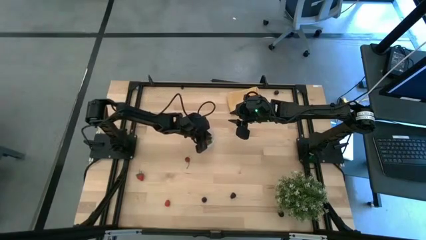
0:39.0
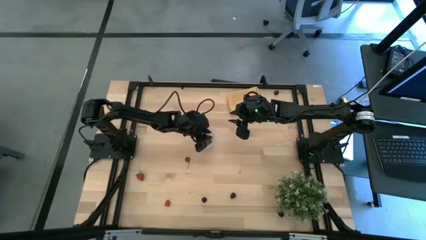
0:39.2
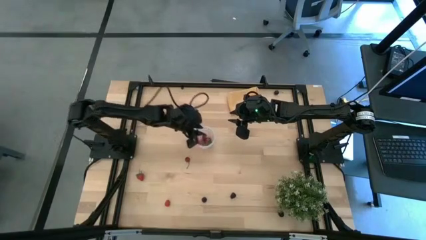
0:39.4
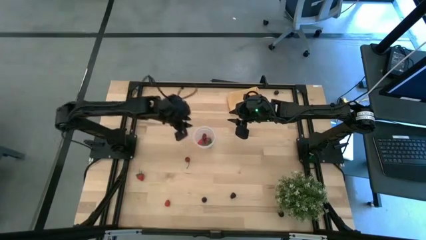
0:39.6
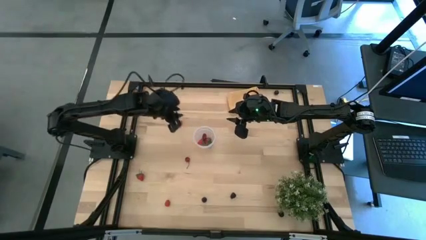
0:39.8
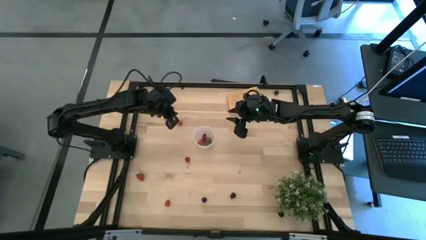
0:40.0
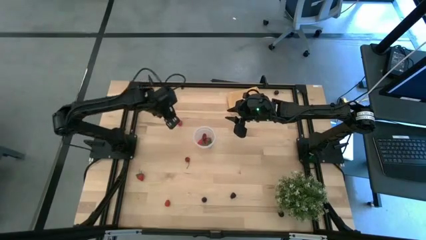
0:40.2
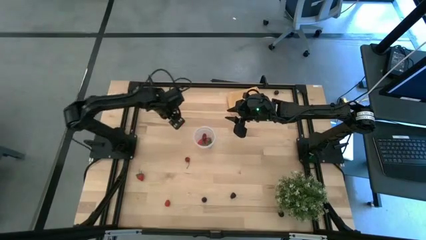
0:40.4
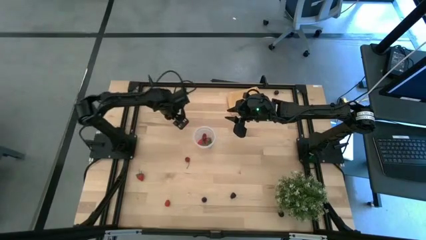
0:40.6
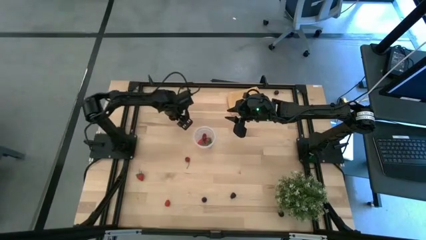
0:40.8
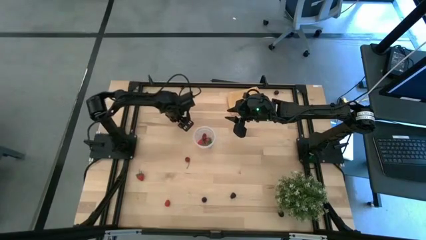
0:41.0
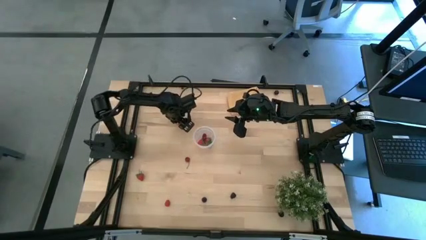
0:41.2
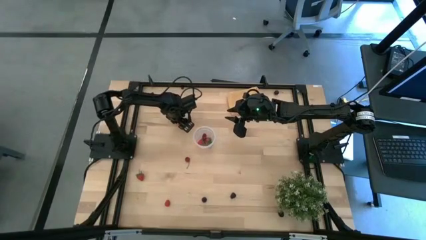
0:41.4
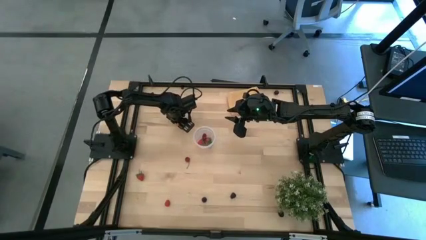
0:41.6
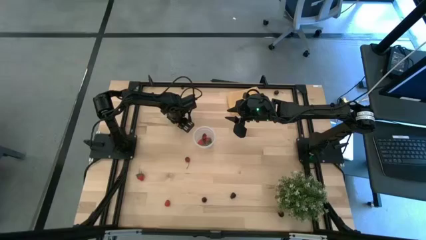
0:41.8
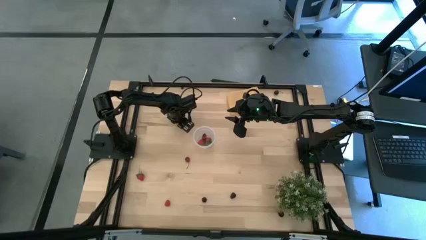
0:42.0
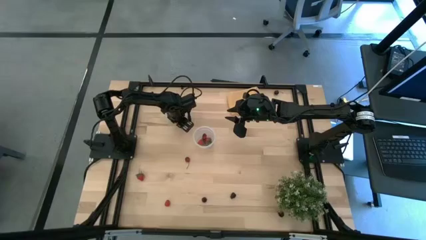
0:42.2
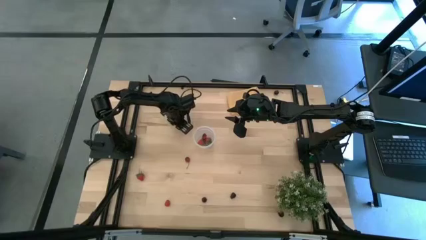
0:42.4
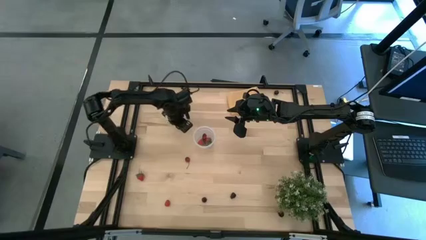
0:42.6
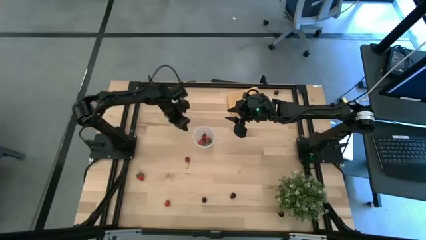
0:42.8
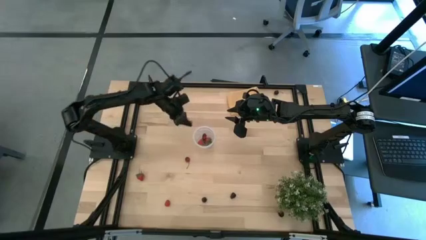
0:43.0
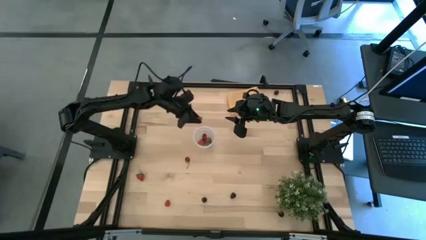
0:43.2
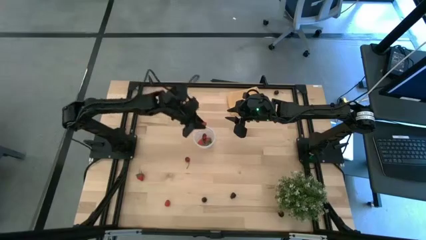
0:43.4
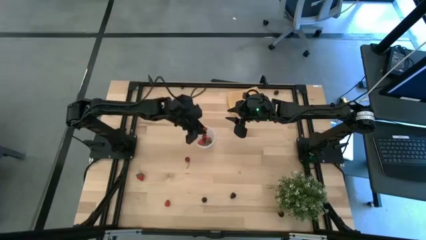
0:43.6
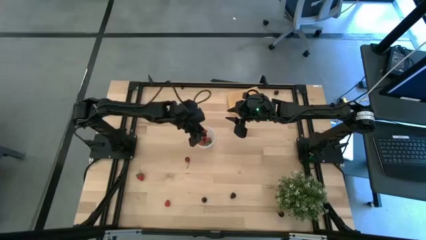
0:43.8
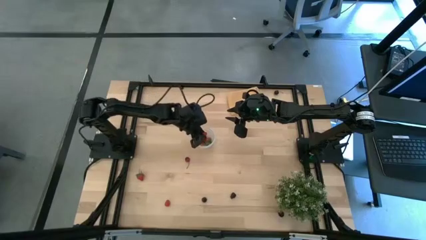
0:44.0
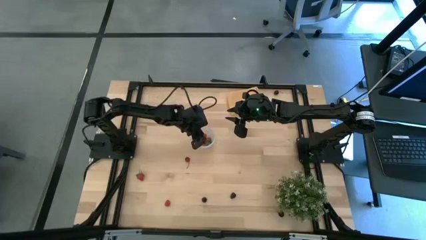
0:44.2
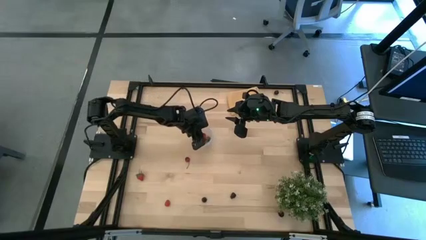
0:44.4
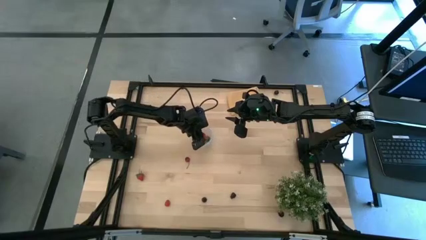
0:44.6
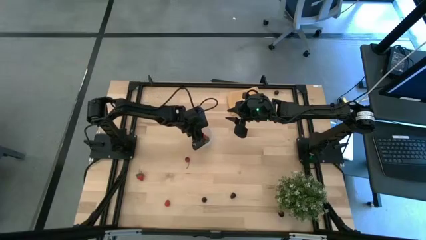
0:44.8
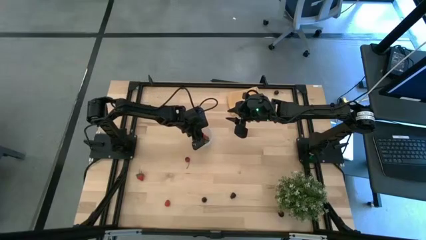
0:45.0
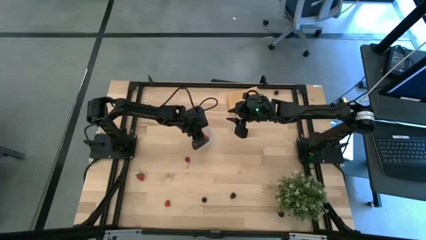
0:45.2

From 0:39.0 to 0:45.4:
Task: Pick and placing Produce into tupperware
Put the top red raspberry into the transparent container

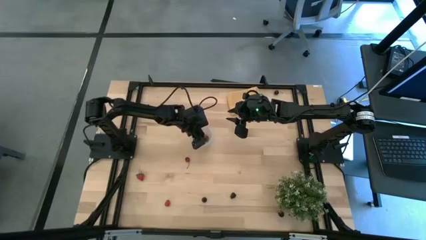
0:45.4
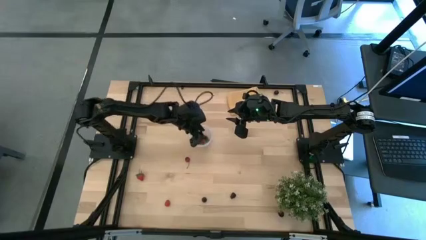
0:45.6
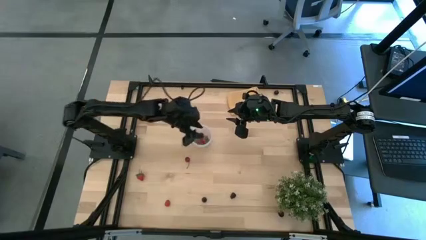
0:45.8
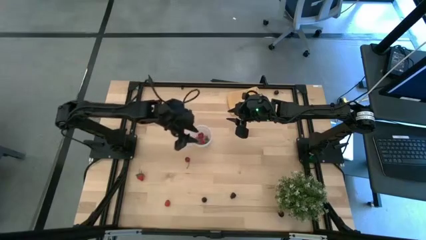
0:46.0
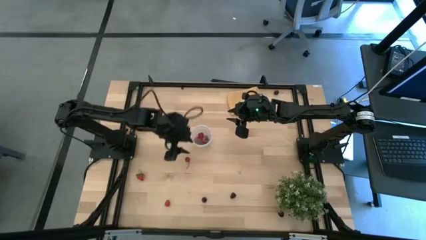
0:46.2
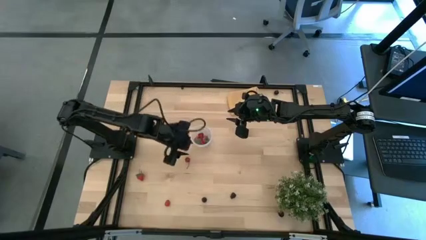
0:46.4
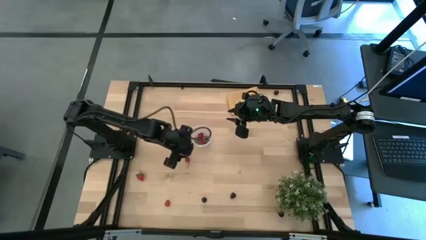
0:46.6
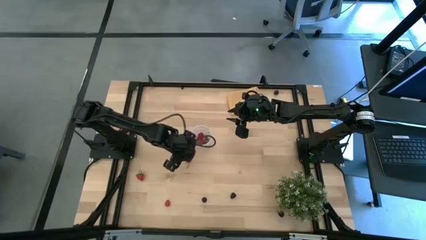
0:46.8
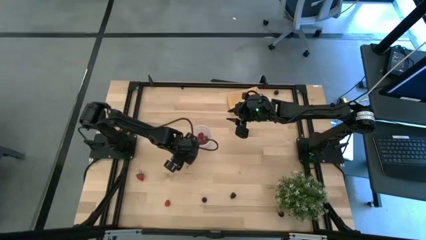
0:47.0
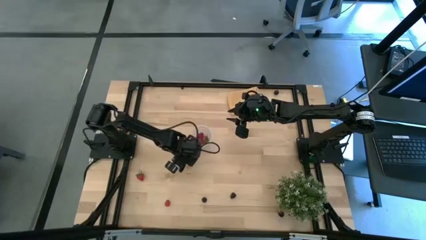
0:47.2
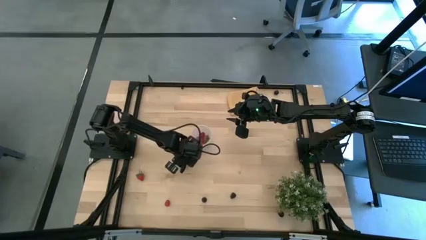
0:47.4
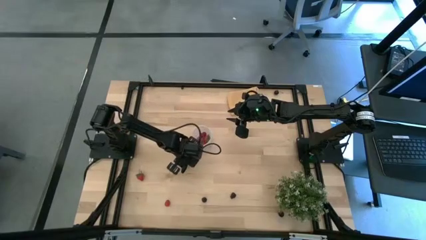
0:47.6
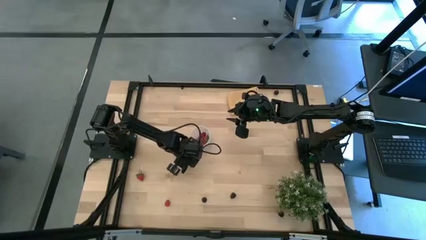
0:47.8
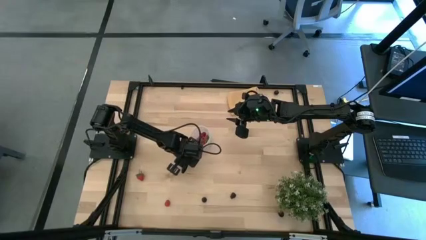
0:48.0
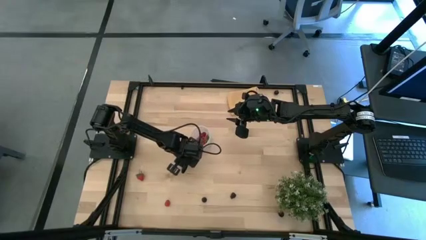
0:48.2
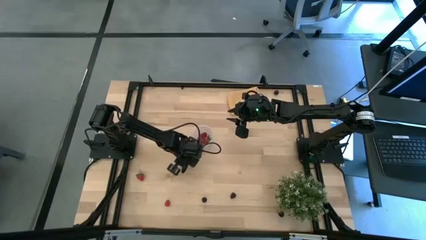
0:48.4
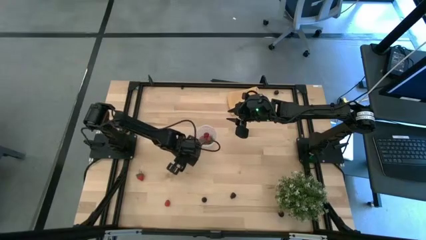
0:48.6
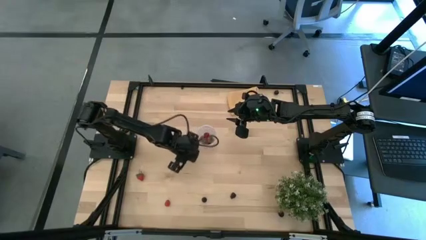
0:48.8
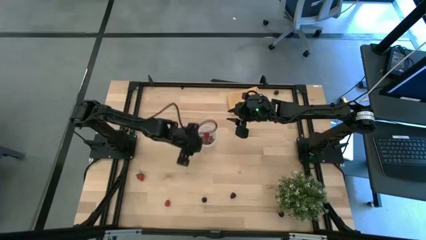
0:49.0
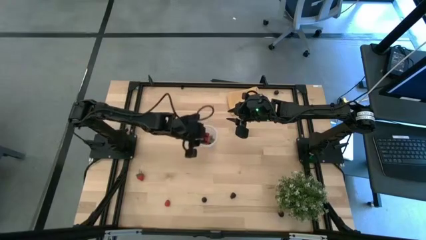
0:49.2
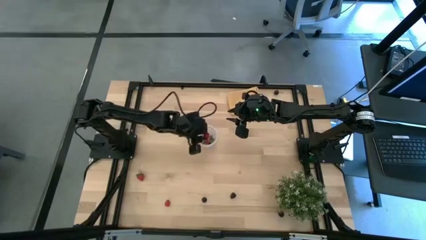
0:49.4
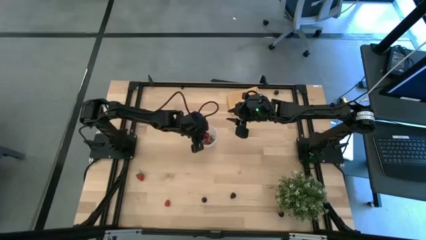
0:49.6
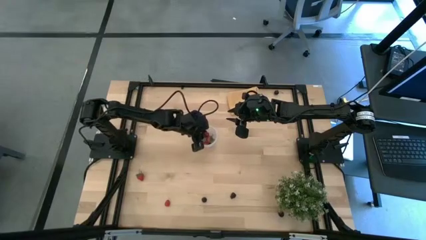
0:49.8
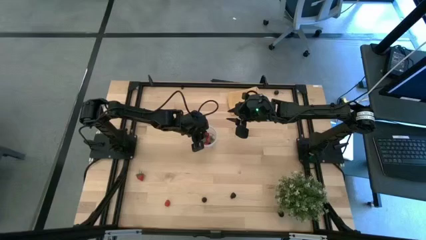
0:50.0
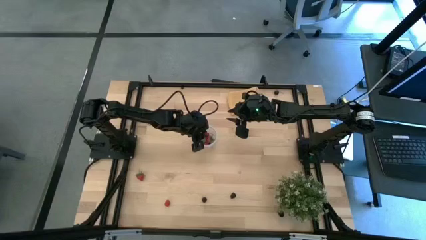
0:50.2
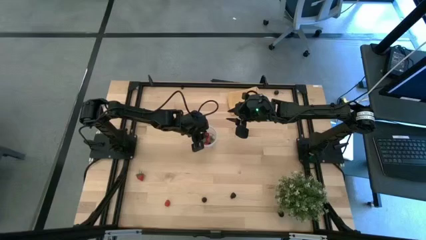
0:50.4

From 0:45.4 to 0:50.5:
Put the red cherry into the transparent container

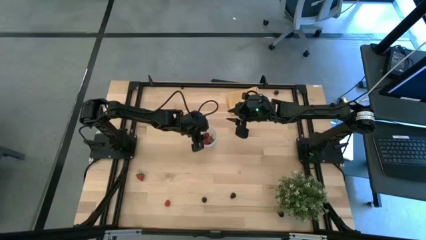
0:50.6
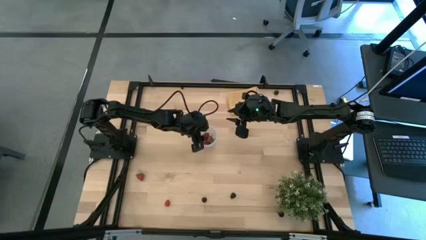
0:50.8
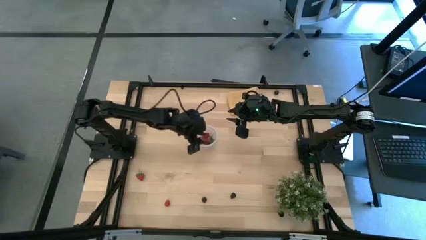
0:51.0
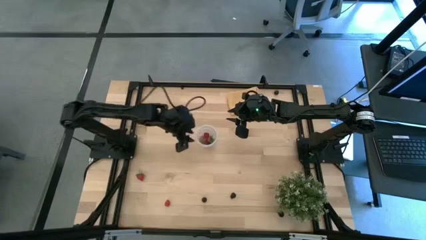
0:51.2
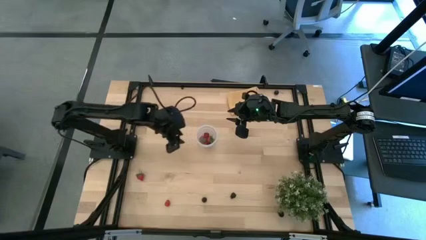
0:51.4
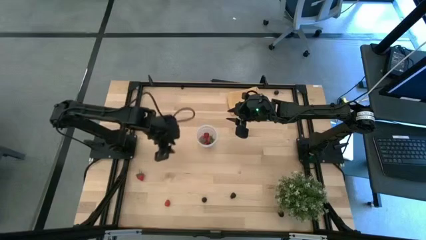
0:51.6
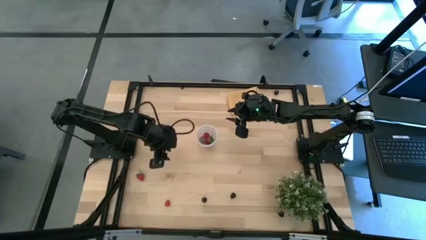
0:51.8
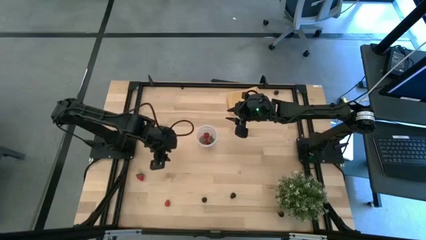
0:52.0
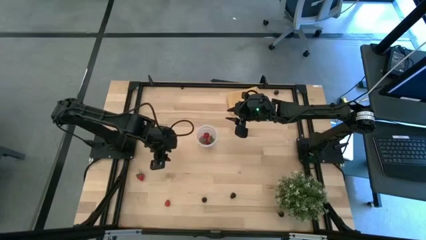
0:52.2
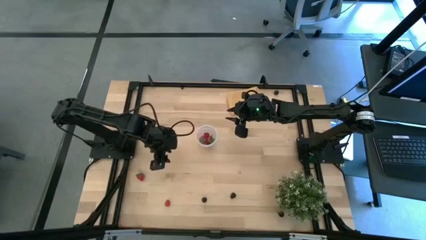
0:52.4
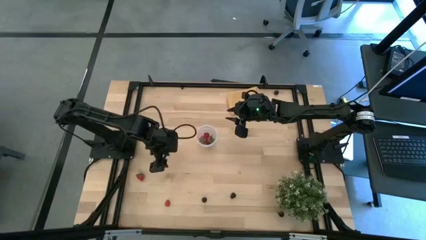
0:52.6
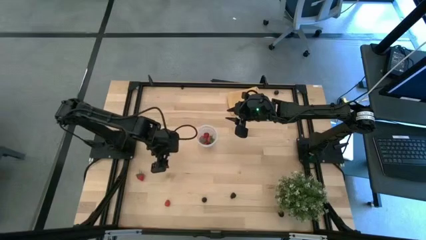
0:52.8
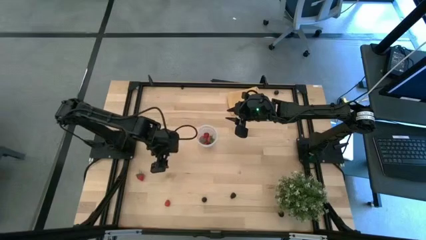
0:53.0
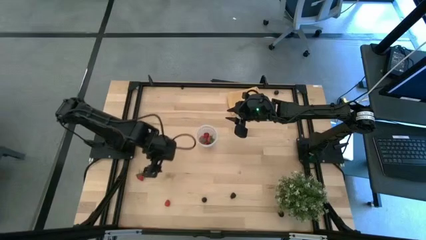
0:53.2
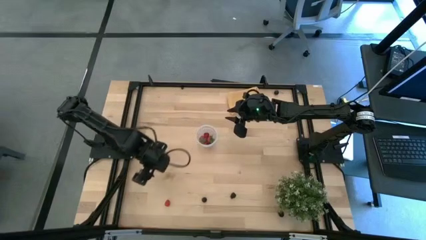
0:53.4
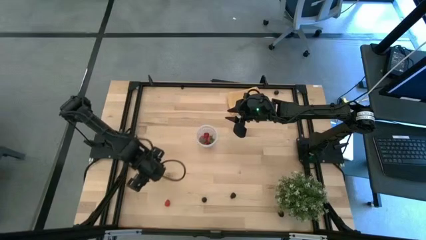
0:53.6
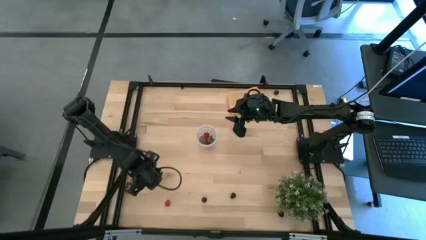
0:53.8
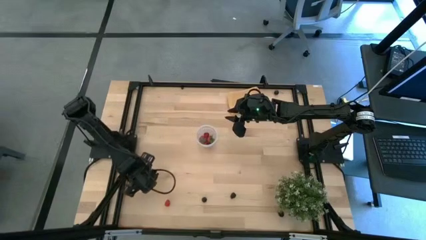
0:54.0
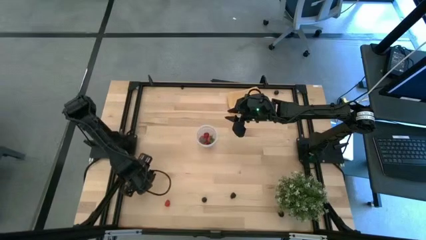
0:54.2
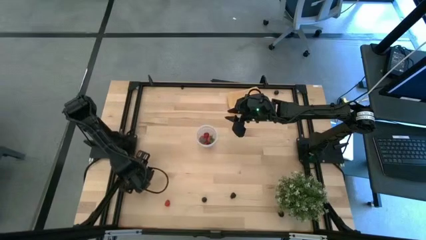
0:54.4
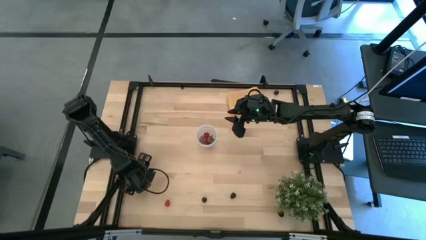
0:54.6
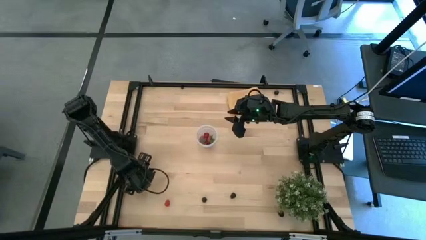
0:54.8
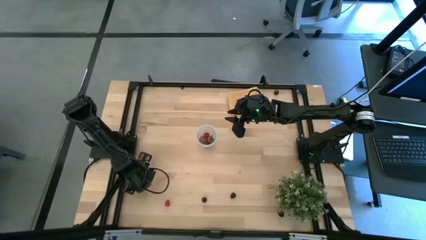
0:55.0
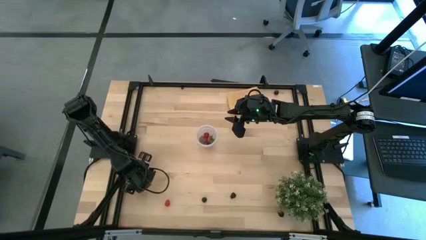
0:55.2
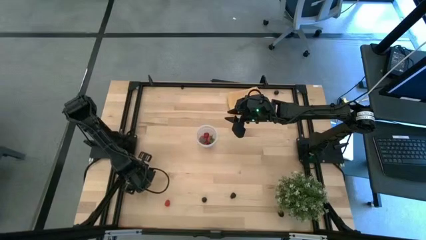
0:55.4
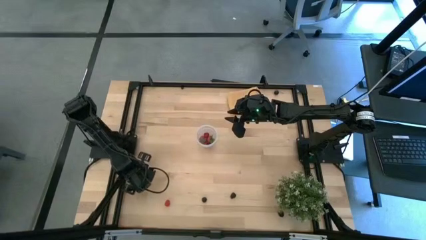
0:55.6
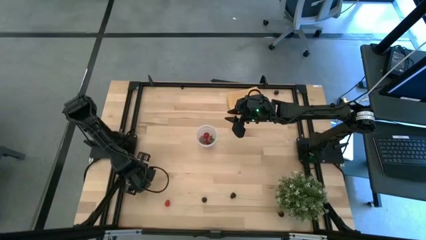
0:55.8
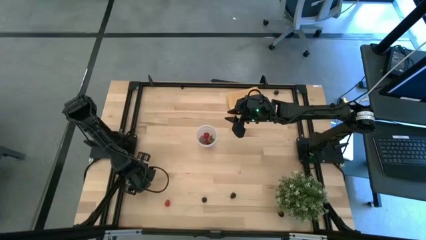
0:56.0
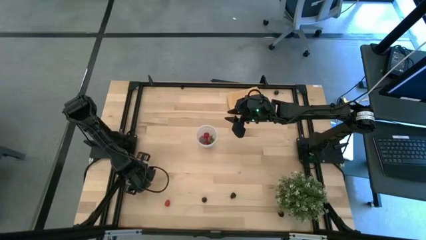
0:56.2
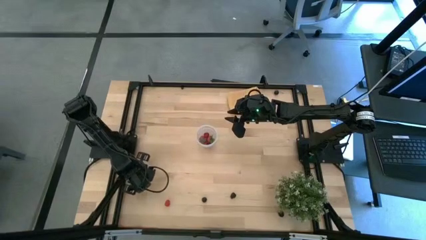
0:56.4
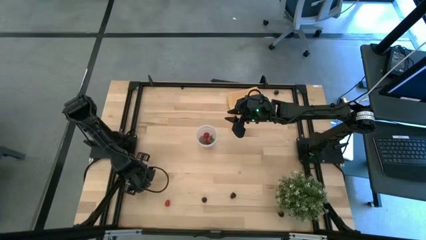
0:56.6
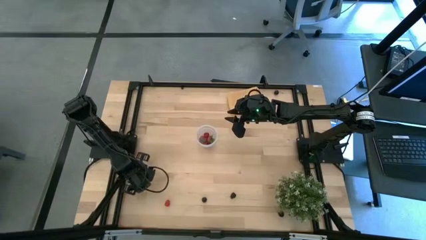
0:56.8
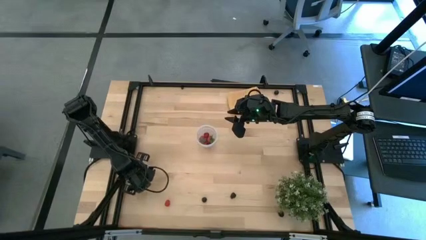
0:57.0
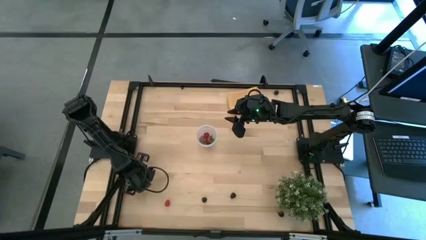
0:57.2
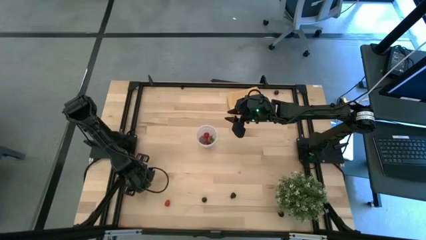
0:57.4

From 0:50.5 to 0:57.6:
Put the strawberry into the transparent container
